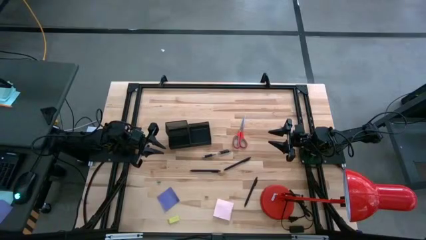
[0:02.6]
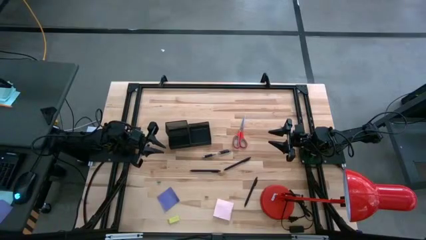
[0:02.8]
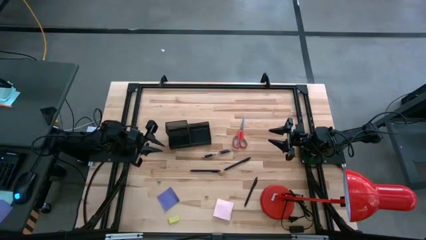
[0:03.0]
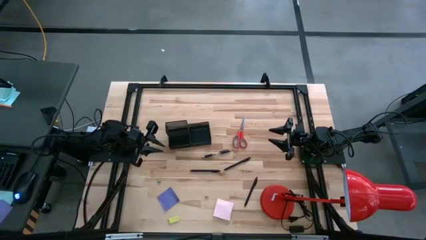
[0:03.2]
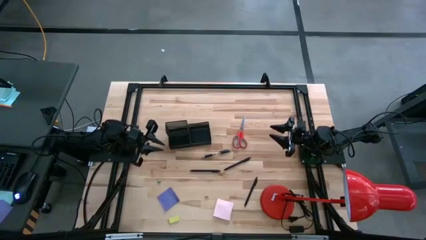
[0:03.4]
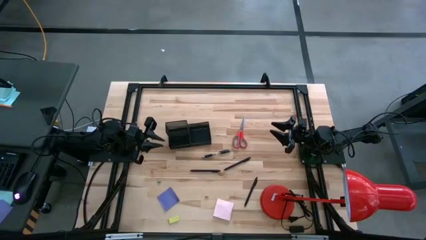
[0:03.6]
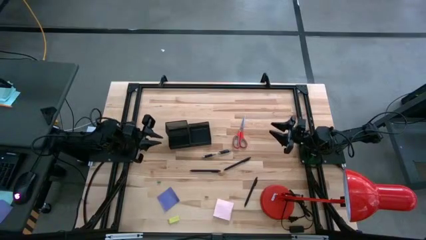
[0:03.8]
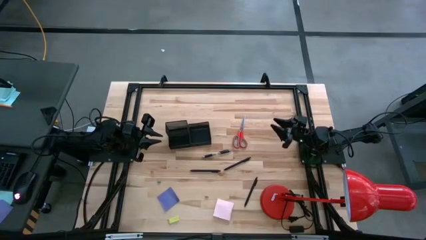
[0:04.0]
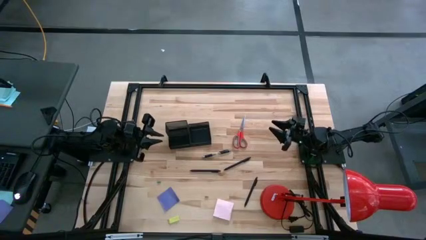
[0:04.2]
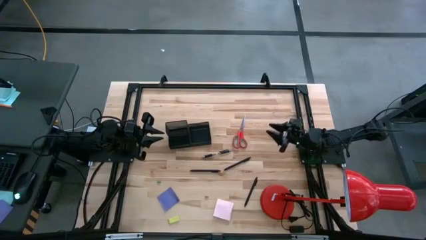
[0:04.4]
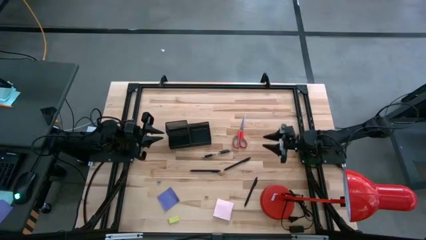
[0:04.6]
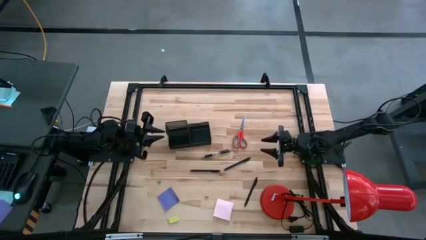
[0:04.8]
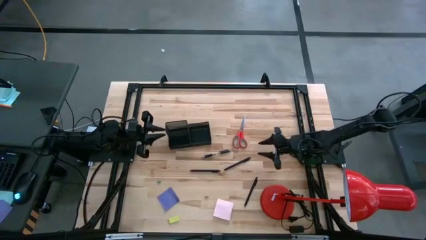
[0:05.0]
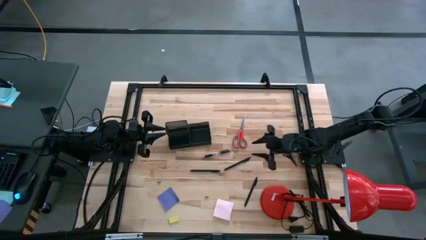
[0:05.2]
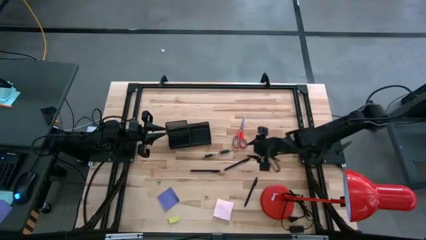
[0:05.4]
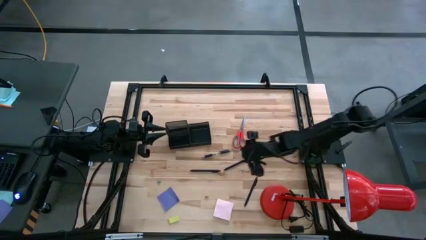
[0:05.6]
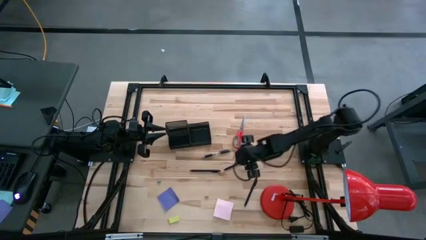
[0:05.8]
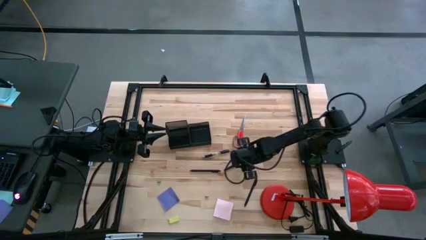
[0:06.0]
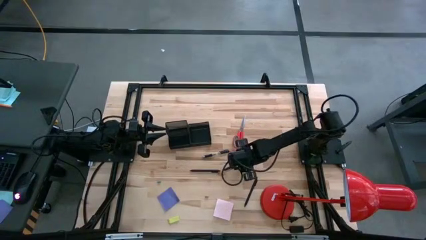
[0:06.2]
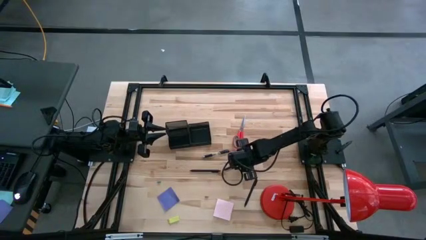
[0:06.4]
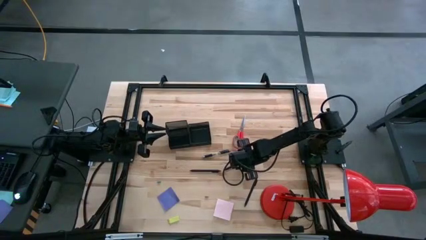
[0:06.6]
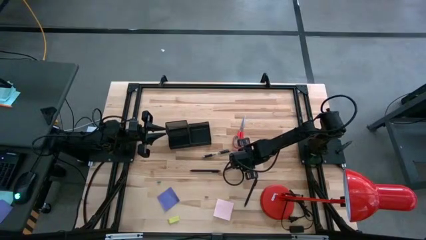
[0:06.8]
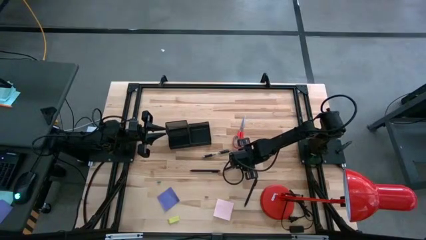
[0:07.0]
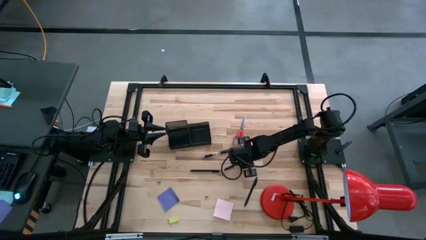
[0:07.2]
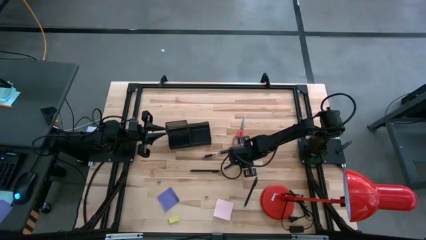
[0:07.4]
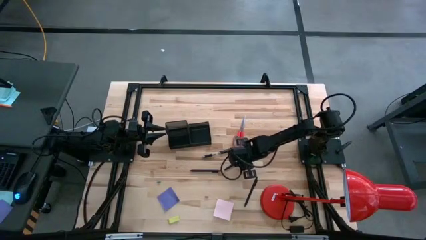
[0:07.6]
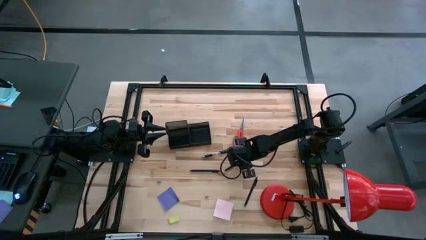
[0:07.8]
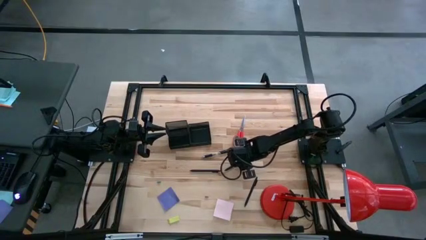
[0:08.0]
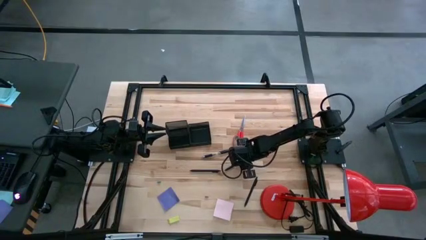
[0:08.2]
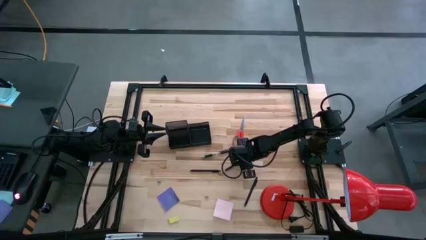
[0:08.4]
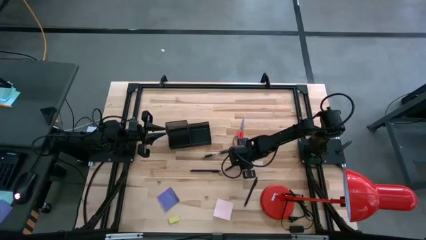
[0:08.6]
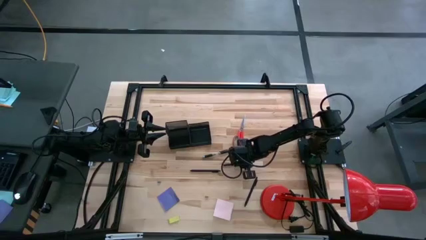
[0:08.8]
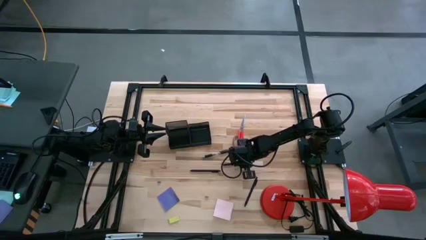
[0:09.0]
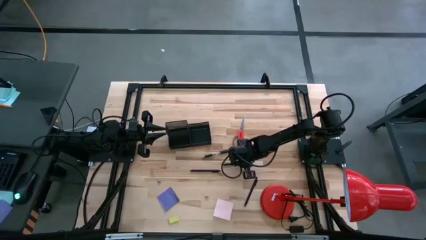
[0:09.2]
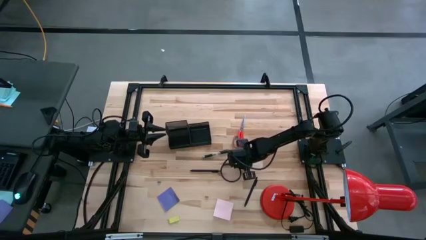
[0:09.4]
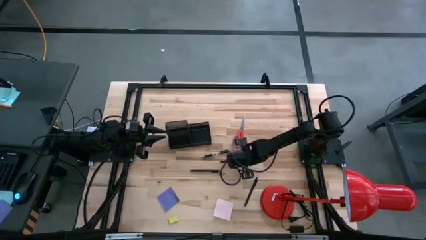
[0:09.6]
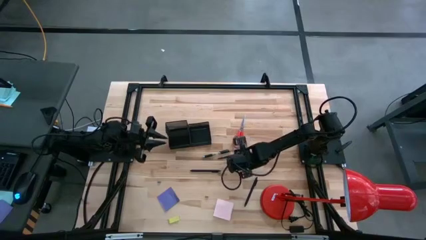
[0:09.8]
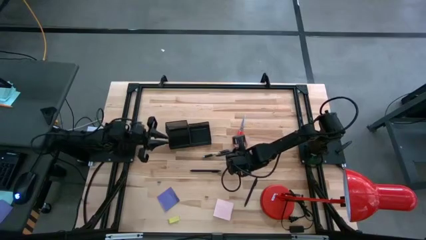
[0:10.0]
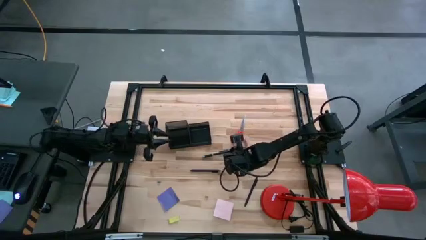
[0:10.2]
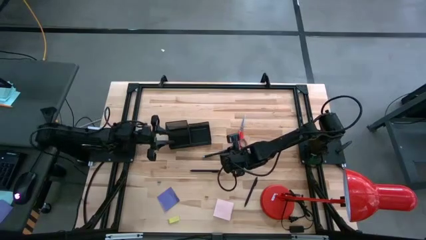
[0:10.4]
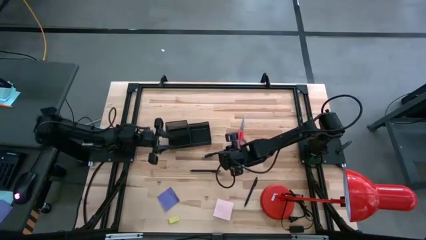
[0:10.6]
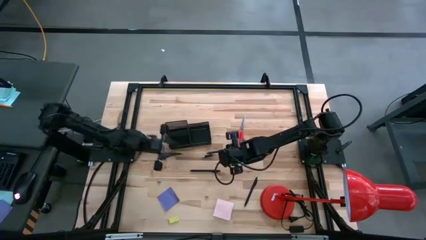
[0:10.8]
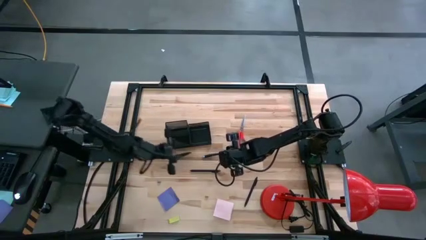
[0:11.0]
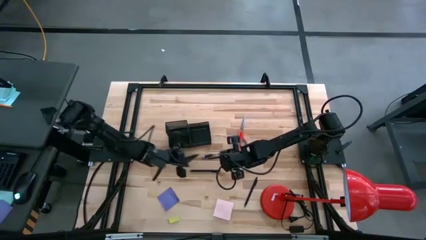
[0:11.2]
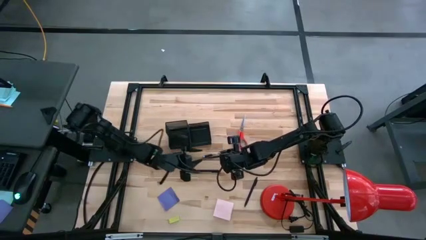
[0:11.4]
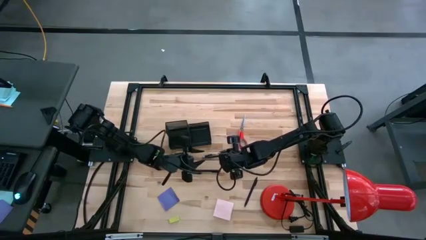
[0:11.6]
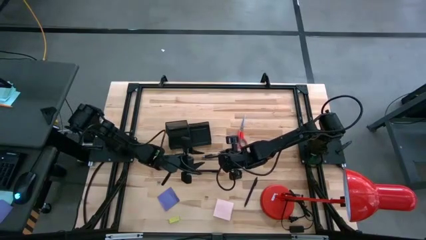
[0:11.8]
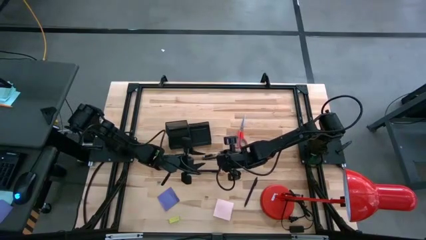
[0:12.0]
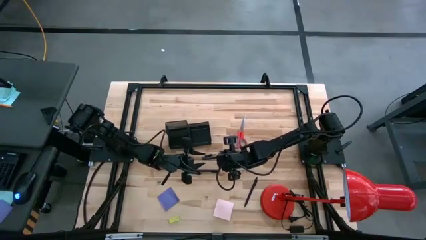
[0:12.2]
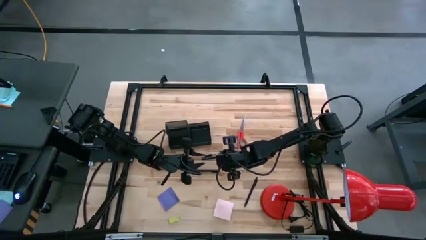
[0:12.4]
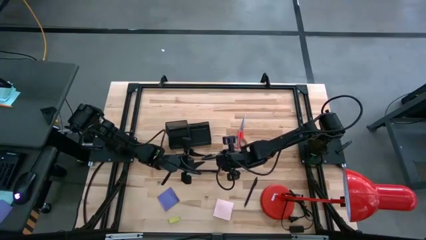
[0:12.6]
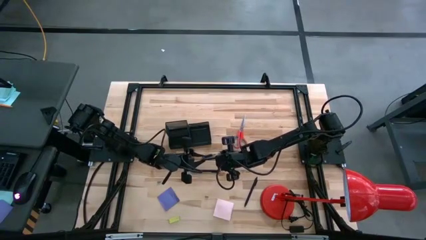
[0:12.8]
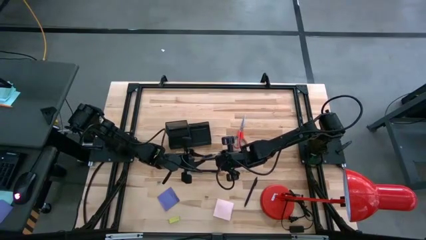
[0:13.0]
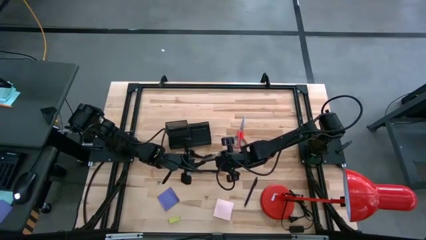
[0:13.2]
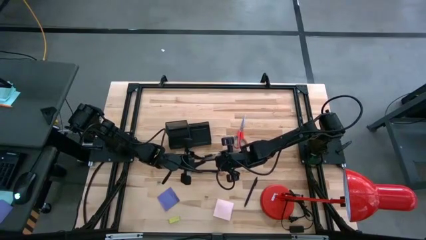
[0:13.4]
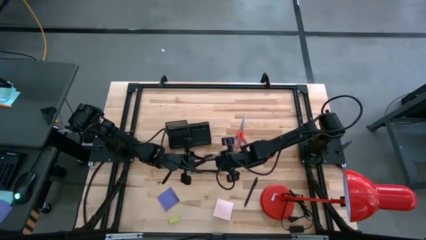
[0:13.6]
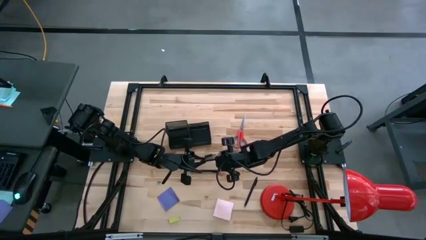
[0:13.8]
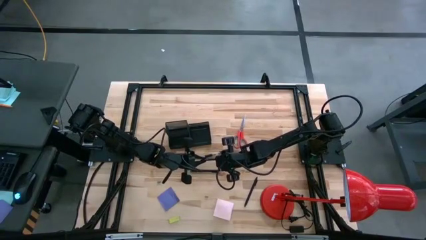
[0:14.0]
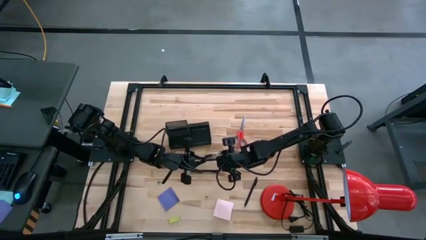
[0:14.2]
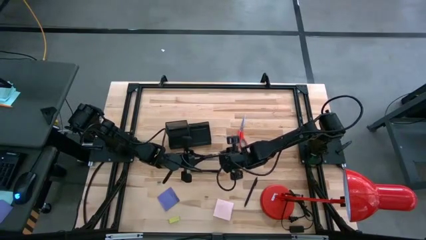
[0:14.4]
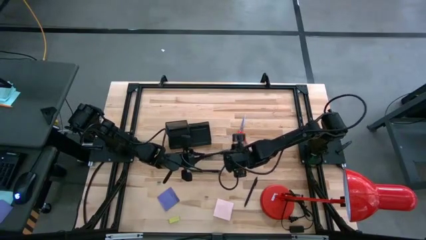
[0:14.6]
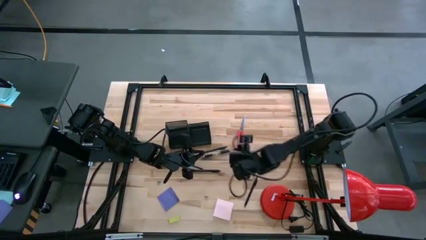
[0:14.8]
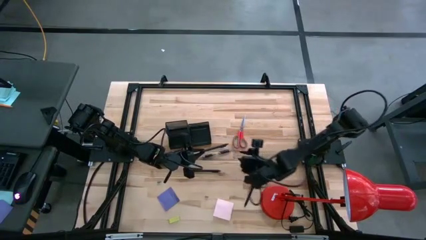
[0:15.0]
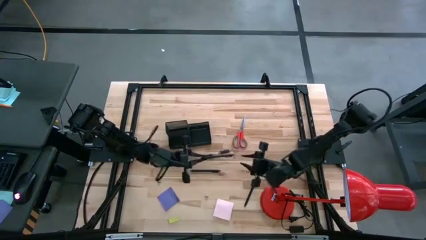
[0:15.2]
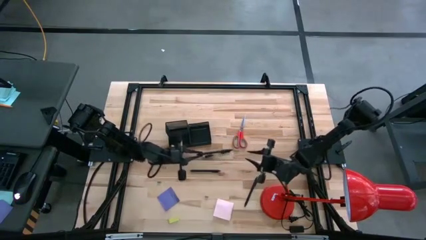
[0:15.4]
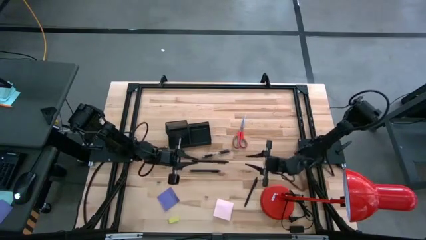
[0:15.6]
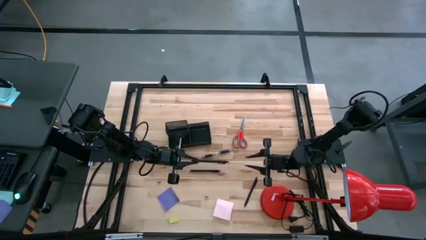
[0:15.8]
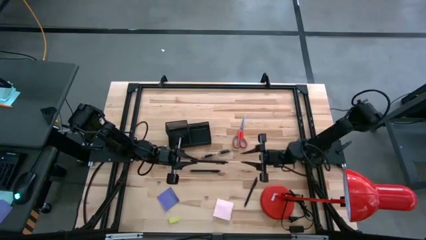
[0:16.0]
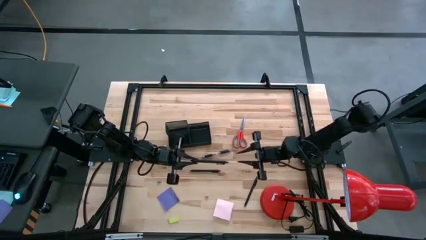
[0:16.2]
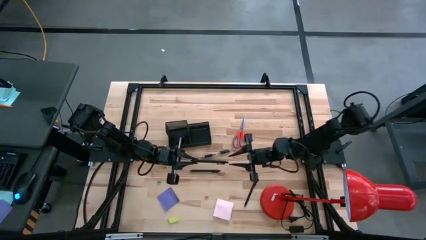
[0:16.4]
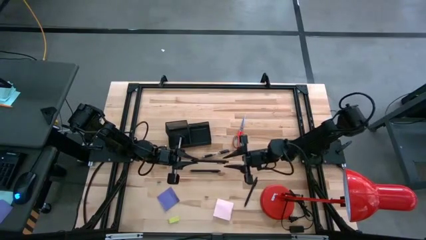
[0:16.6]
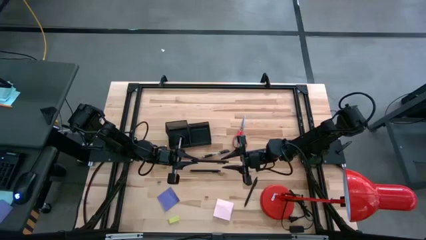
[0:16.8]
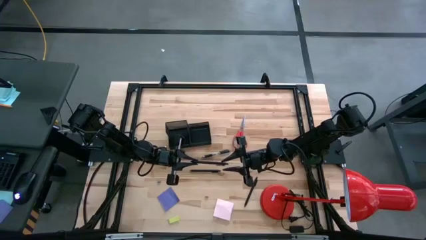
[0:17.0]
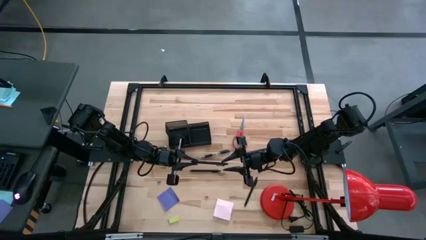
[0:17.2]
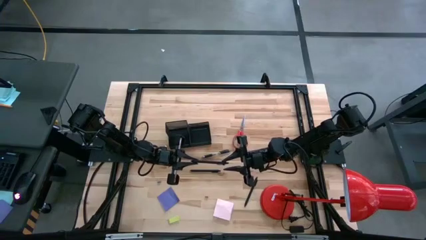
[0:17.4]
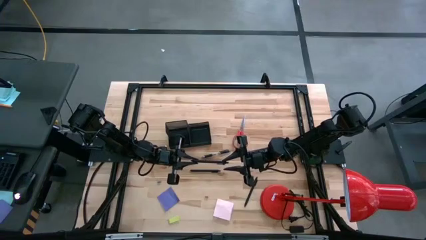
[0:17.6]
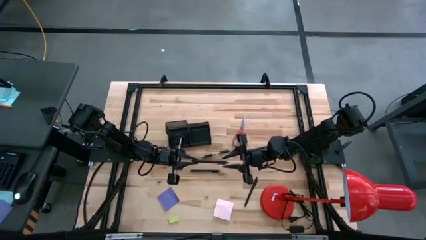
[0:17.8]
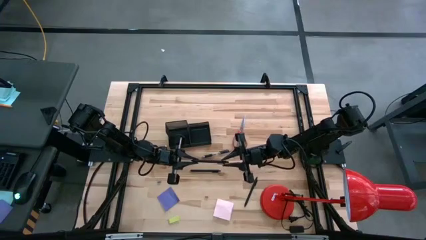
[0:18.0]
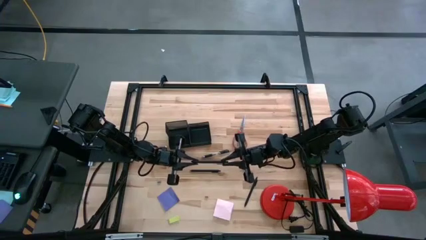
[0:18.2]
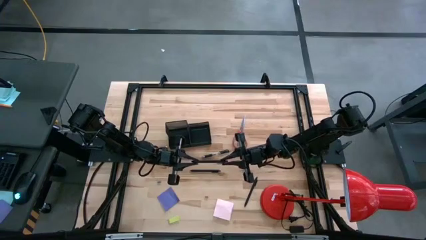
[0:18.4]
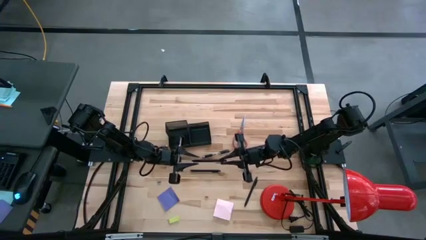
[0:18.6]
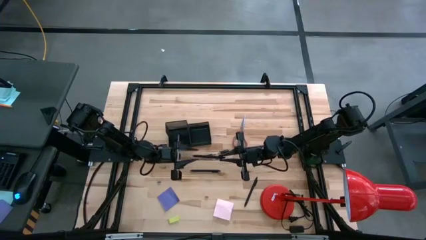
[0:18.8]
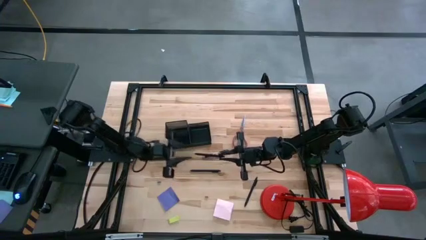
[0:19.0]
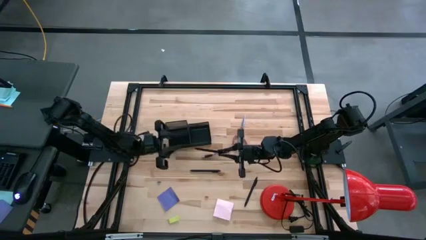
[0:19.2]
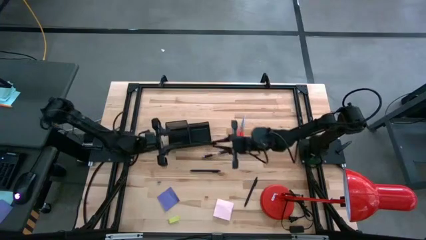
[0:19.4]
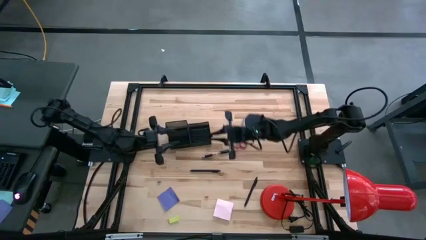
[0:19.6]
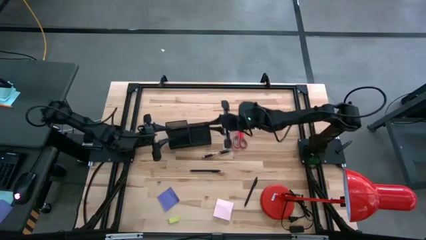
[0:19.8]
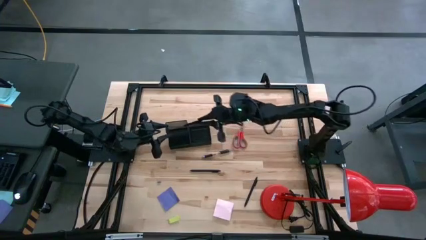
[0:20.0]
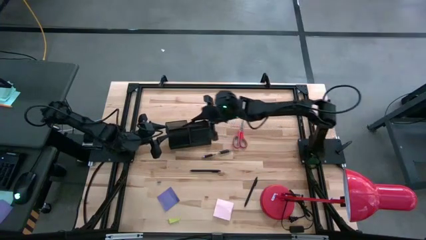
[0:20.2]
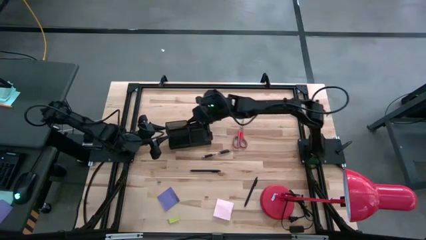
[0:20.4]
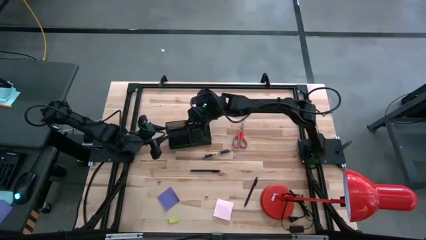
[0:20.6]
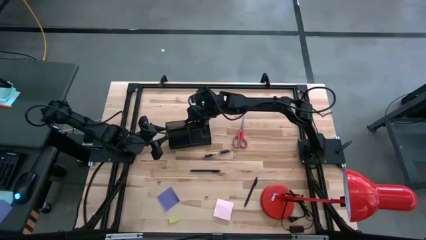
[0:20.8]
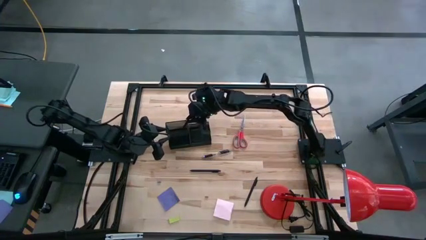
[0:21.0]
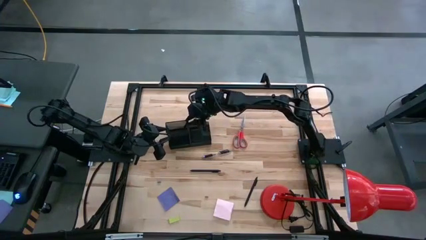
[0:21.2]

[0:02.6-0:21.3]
Task: Pick and place office supplies into organizer
Put the top right black pen into the desk organizer
